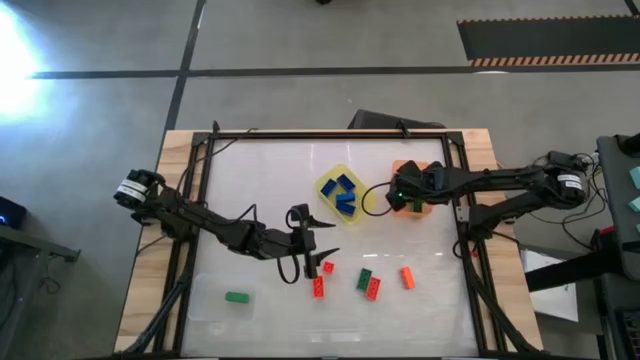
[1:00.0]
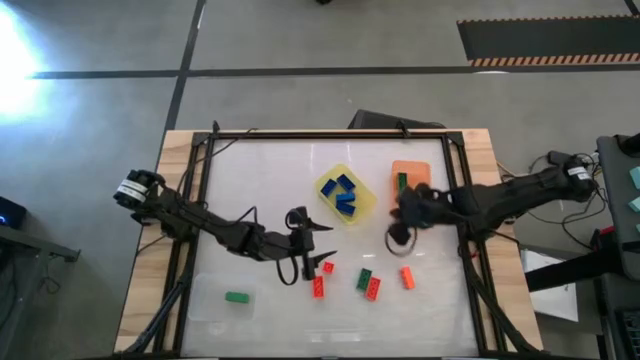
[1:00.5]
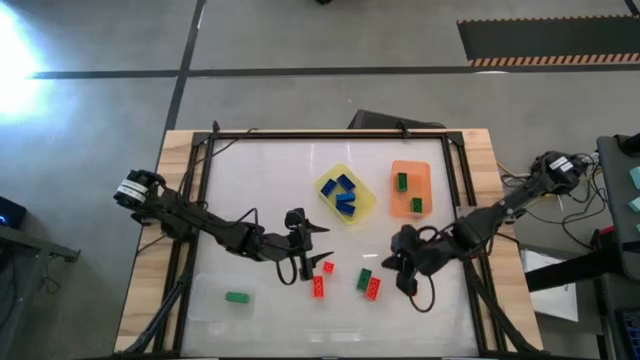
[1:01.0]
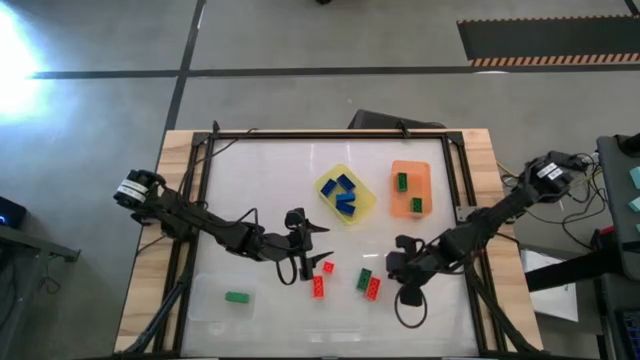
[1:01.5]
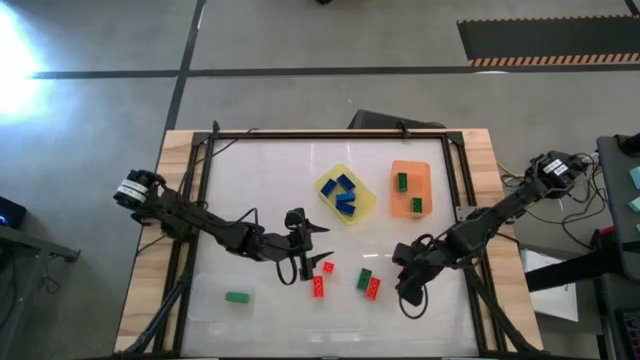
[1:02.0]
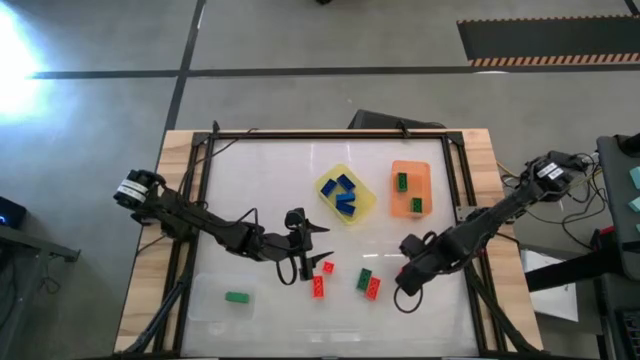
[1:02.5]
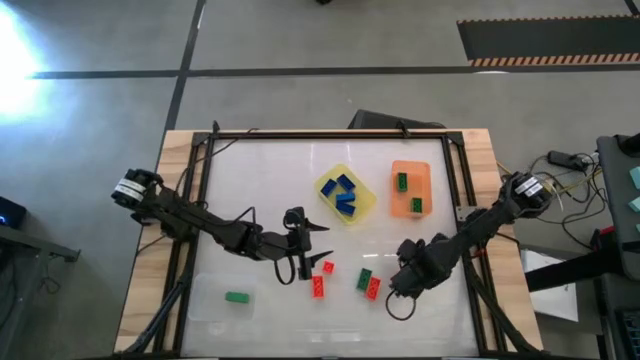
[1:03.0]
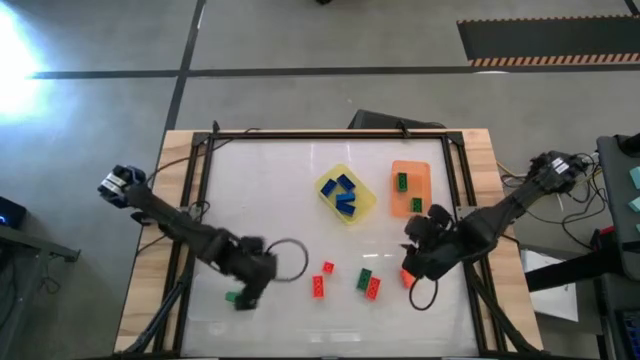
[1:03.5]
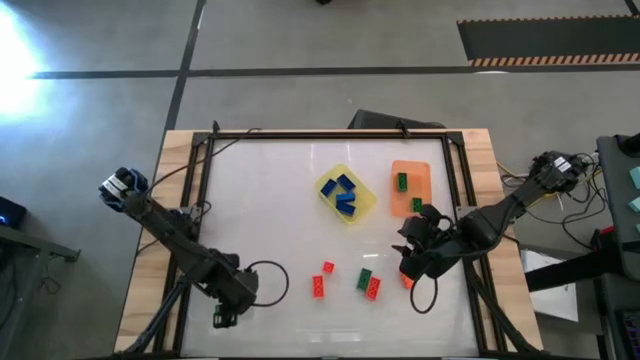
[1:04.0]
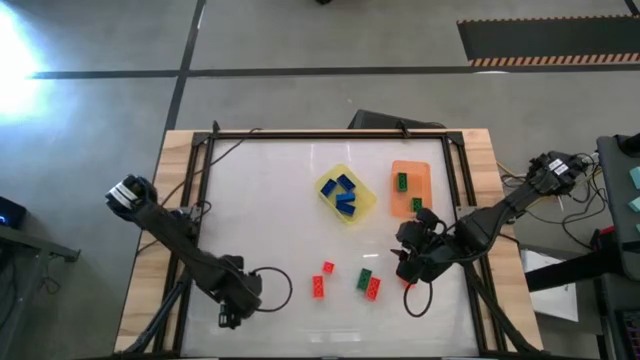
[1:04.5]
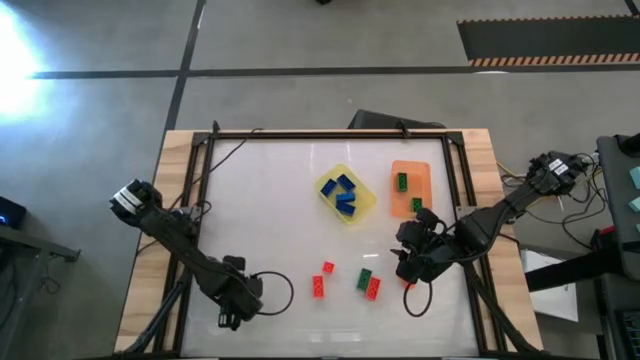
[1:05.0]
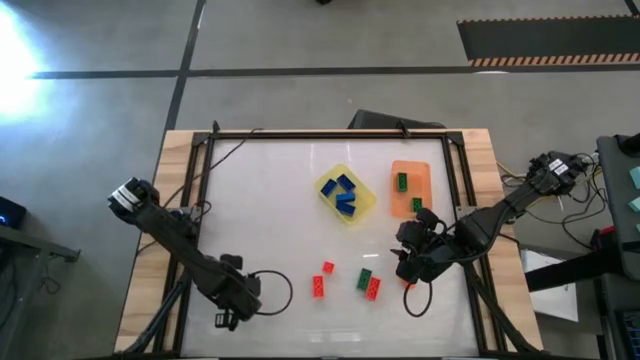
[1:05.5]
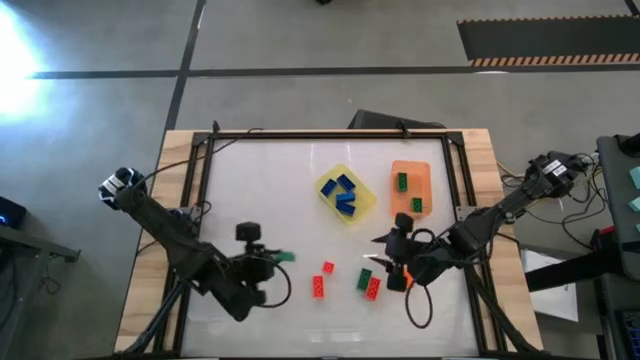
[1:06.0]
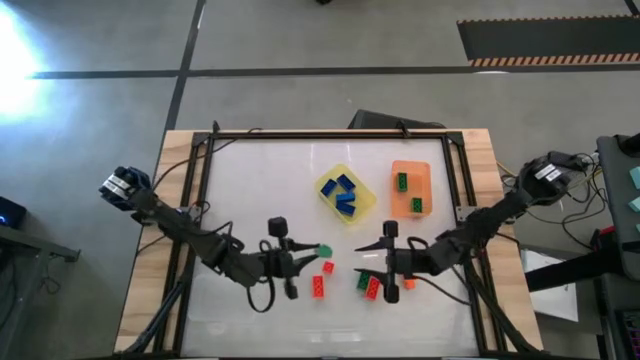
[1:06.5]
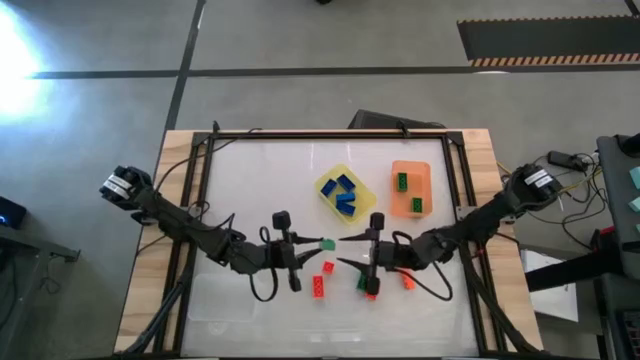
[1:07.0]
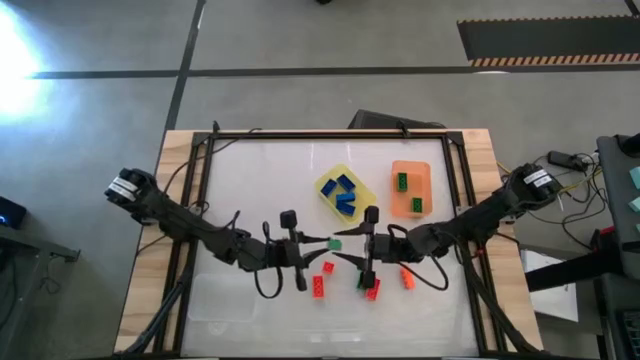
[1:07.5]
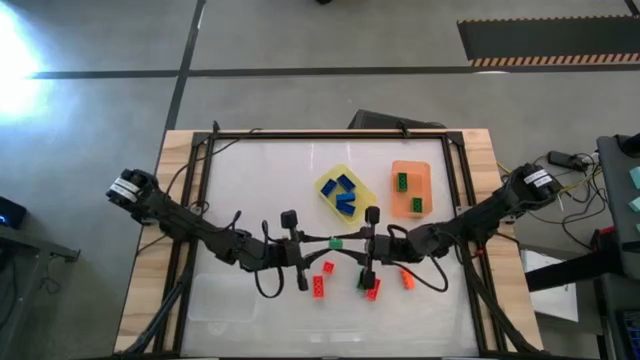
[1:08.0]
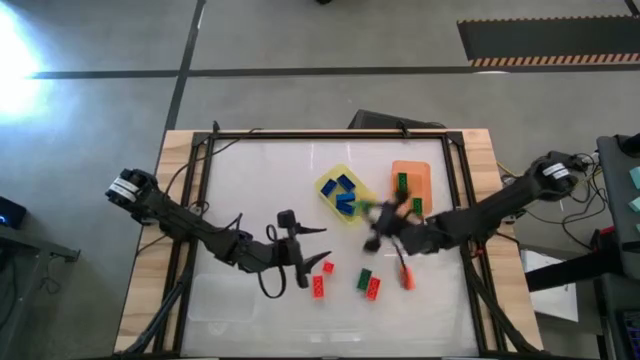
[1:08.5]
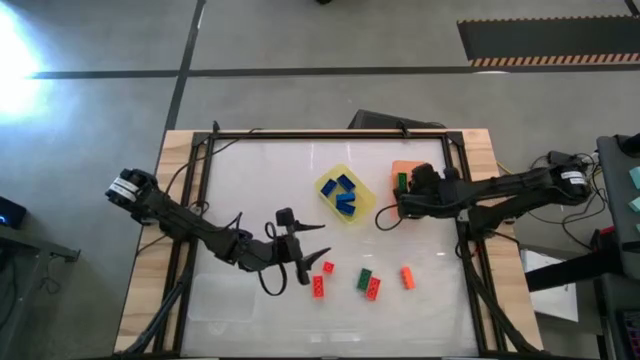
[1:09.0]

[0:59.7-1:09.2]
Task: Sort & place blocks by color
Put the green game piece into the orange bin

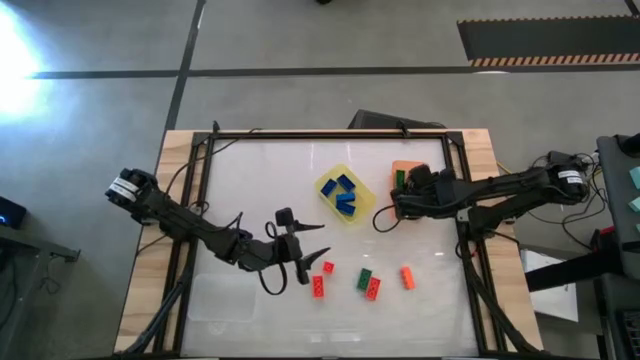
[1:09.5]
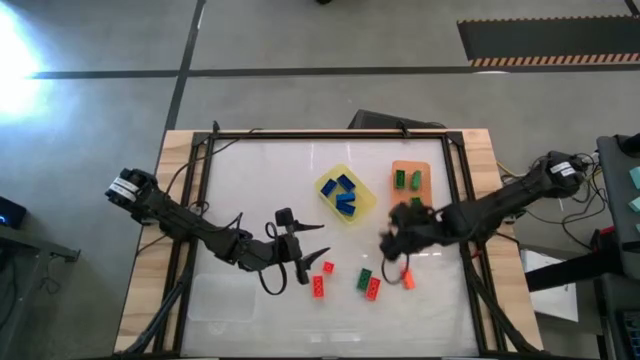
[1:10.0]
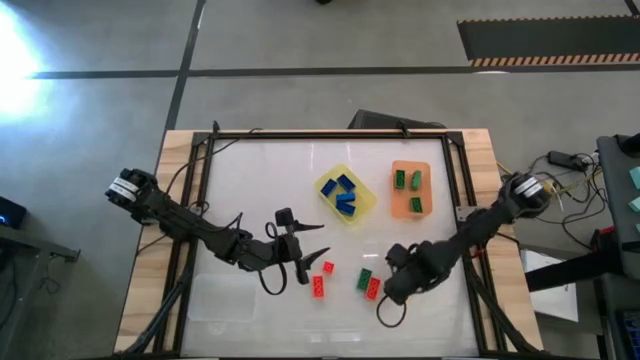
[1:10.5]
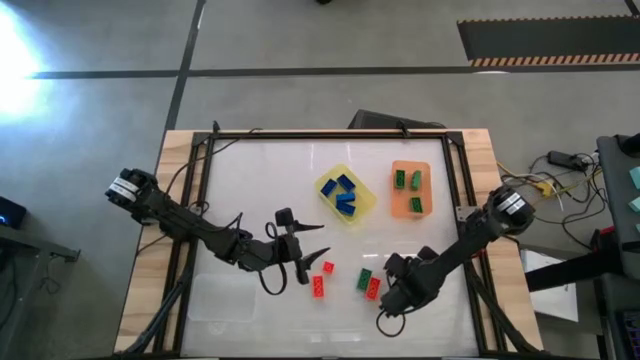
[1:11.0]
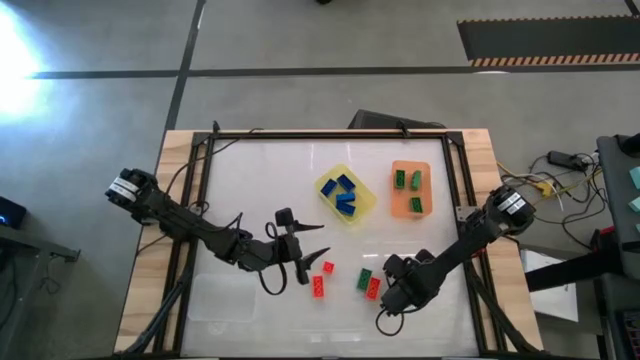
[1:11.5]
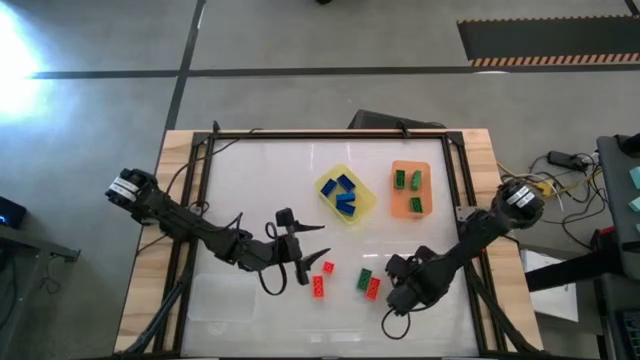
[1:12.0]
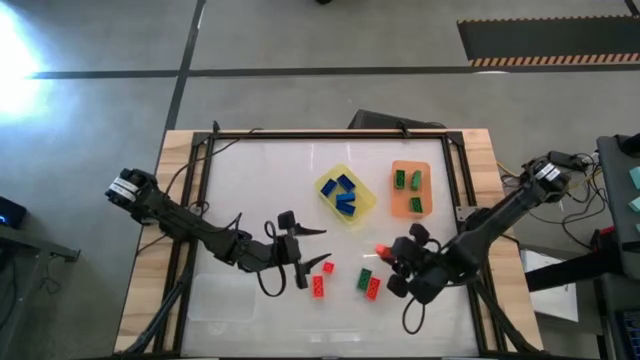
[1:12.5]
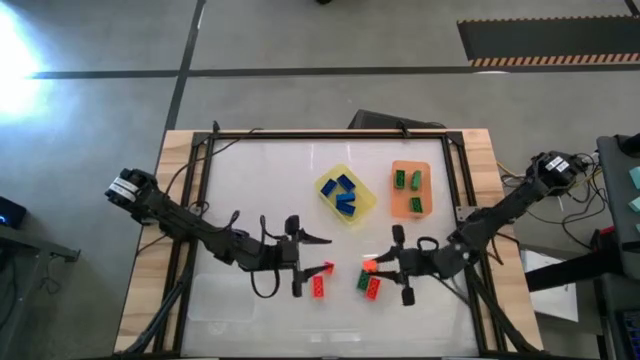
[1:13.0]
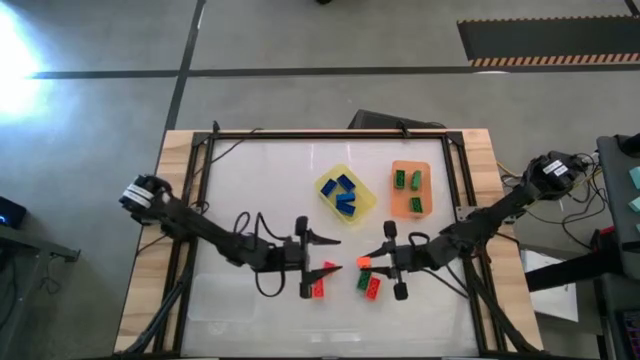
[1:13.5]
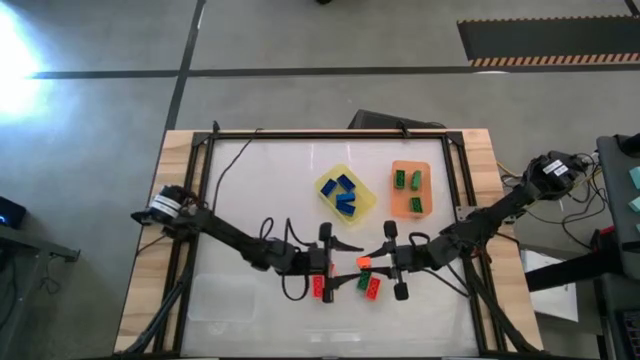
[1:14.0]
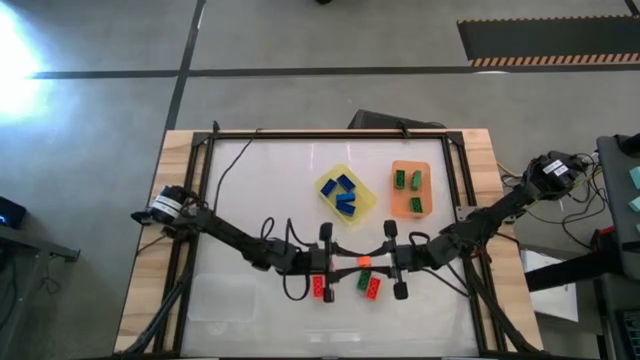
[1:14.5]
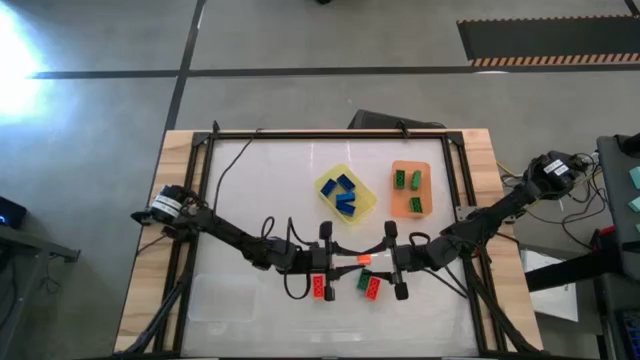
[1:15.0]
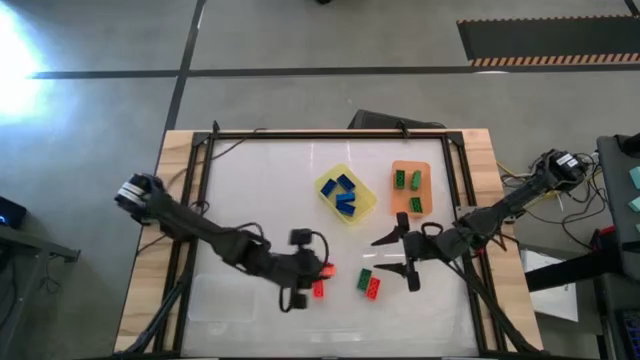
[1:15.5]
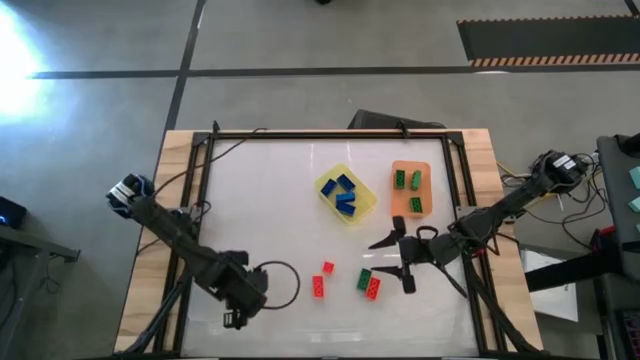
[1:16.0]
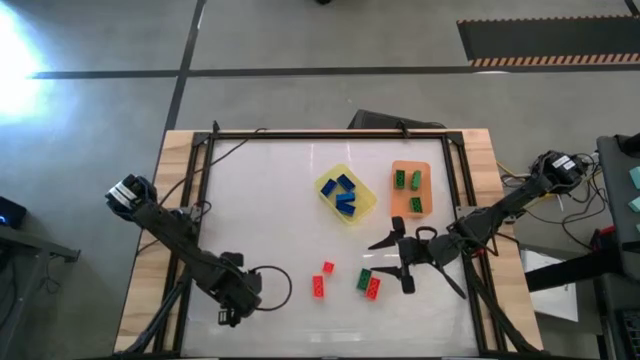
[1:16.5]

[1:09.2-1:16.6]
Put the orange game piece into the transparent bin

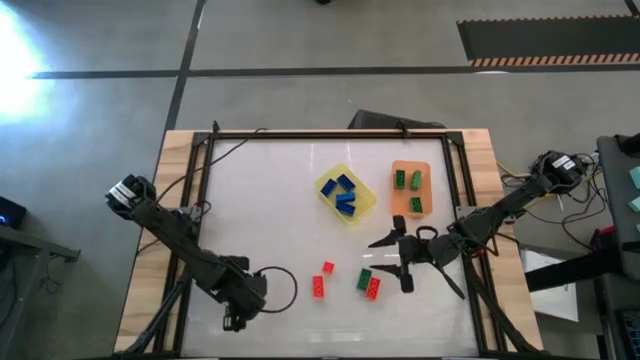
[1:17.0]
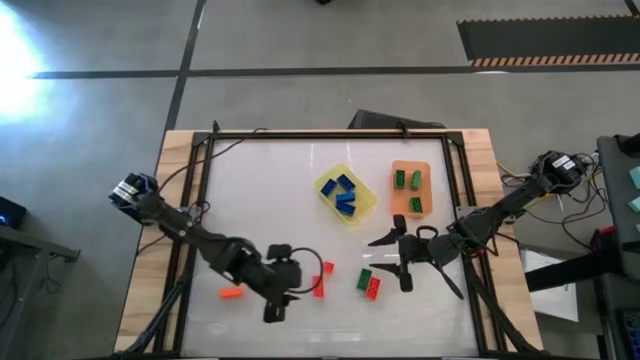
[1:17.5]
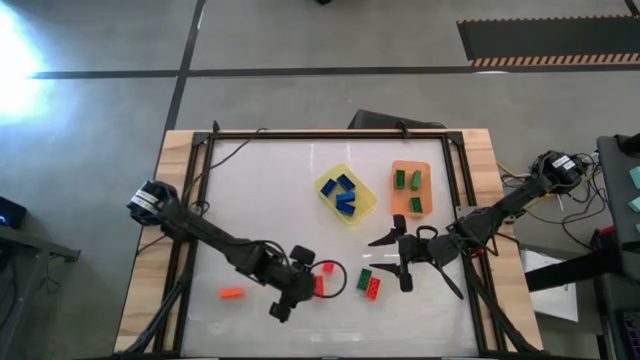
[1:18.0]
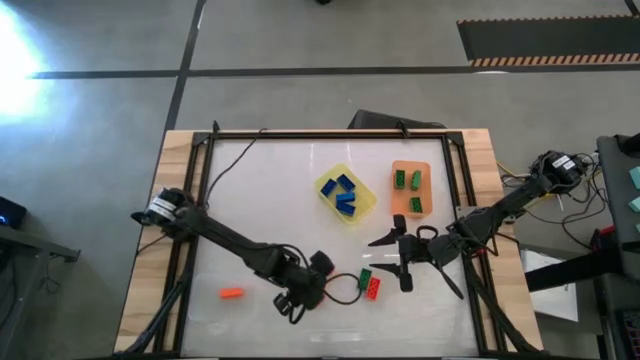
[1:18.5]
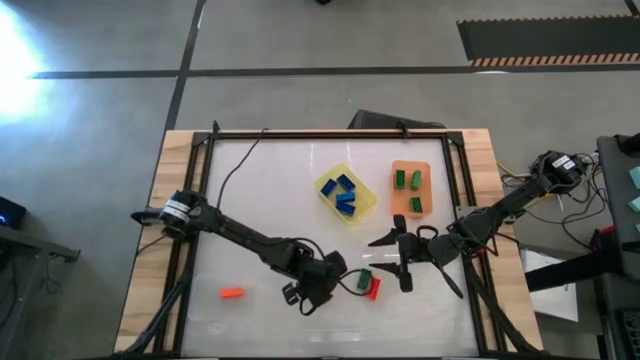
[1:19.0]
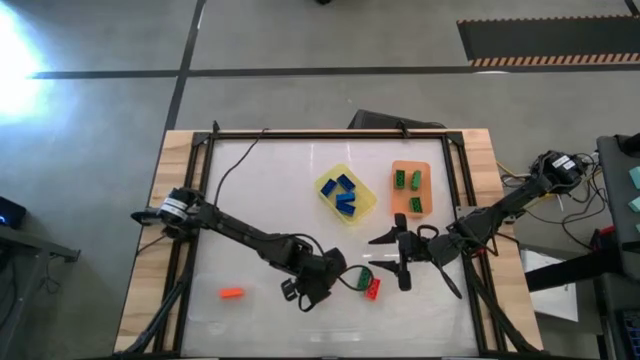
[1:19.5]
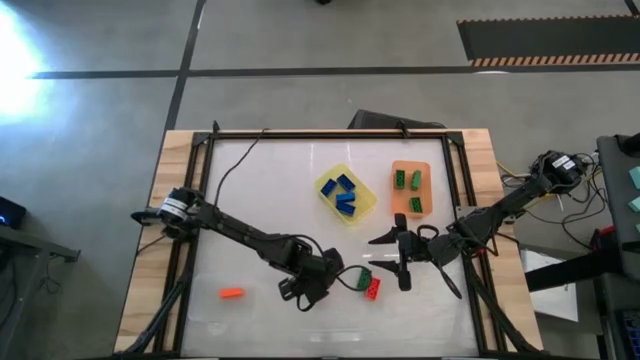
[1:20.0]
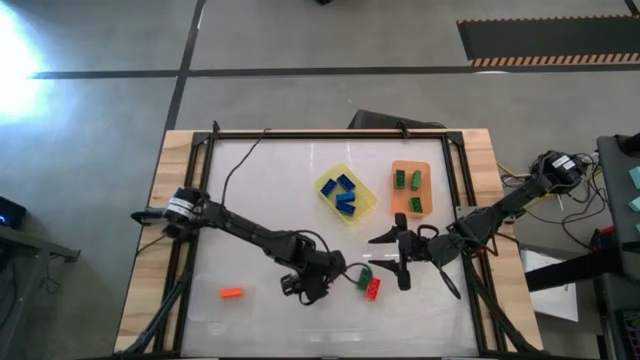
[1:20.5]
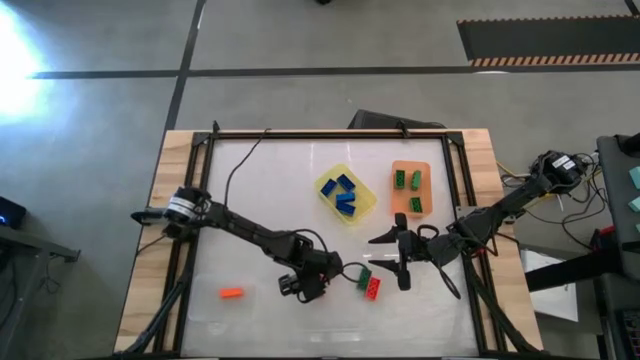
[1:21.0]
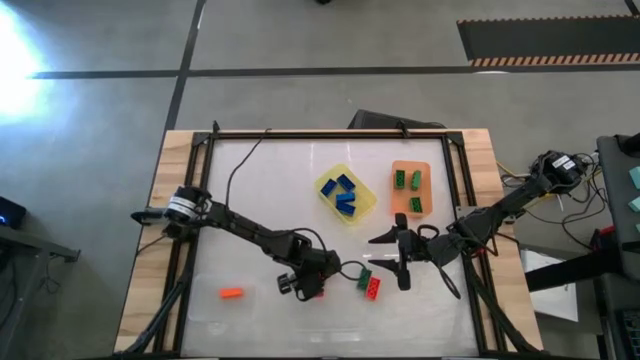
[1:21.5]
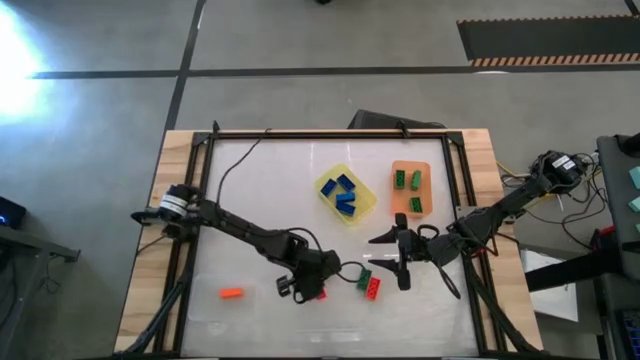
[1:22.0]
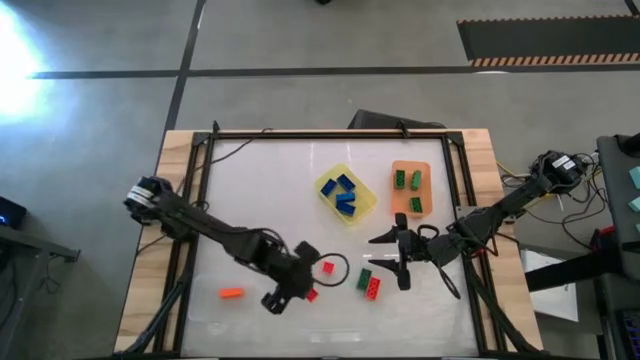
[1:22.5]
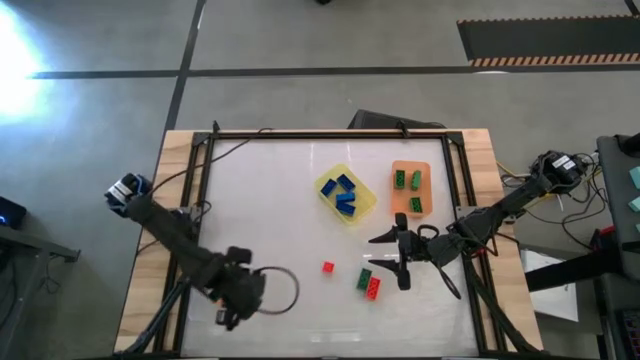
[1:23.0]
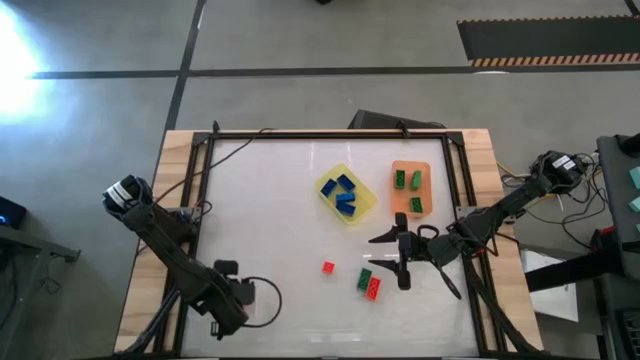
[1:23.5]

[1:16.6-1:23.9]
Put the orange game piece into the transparent bin
